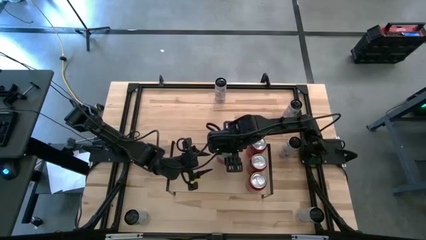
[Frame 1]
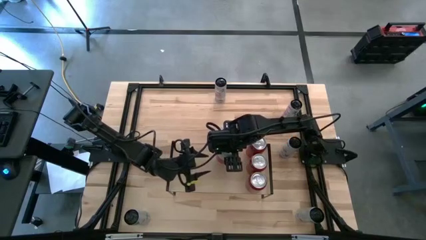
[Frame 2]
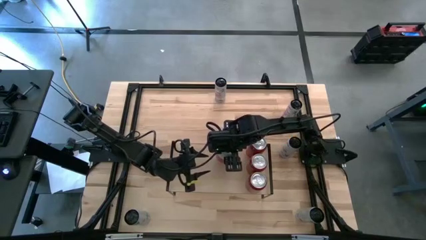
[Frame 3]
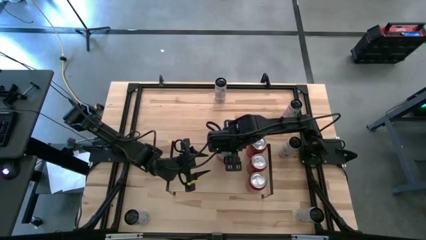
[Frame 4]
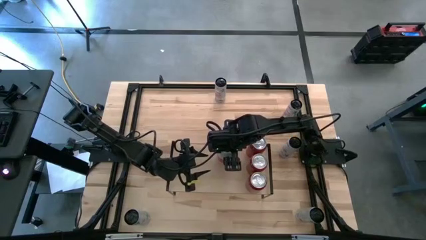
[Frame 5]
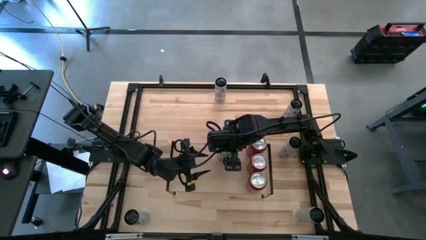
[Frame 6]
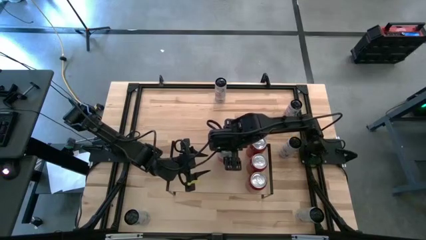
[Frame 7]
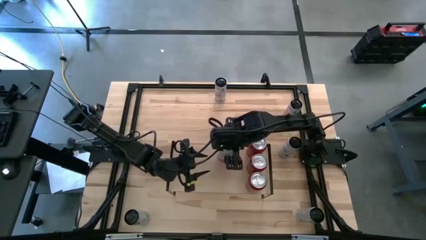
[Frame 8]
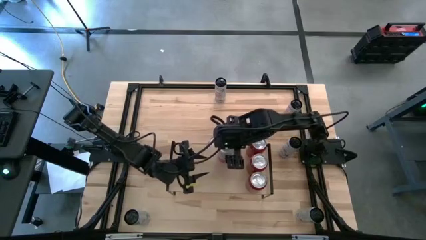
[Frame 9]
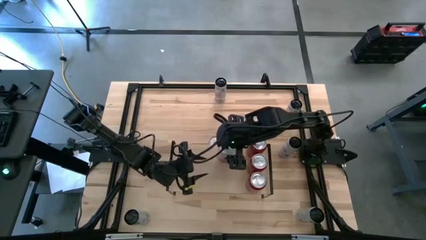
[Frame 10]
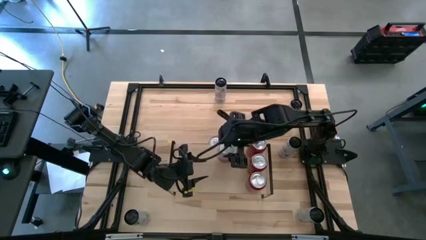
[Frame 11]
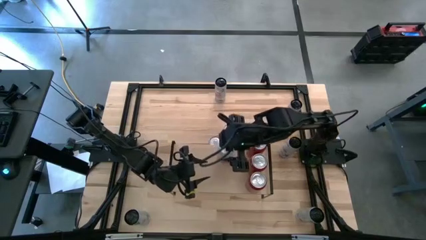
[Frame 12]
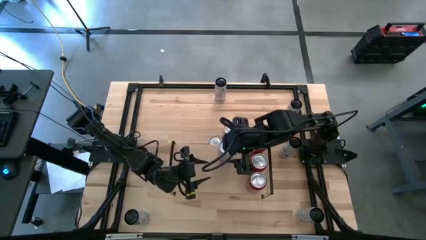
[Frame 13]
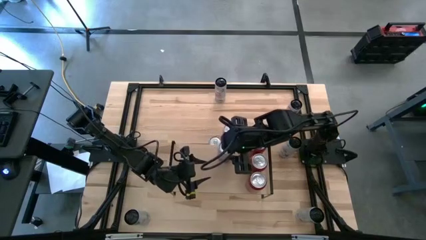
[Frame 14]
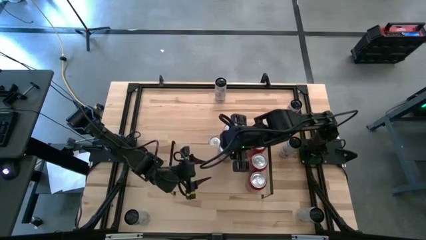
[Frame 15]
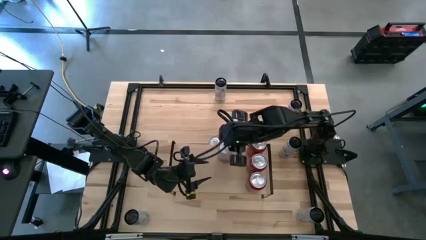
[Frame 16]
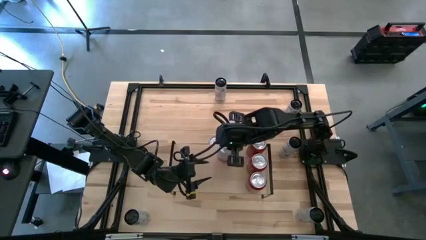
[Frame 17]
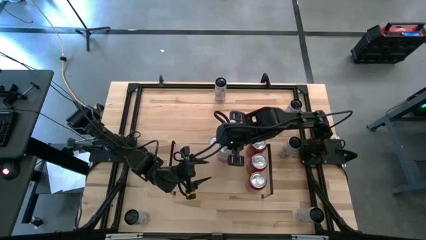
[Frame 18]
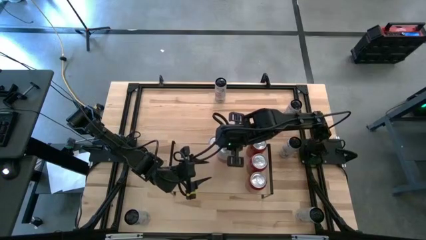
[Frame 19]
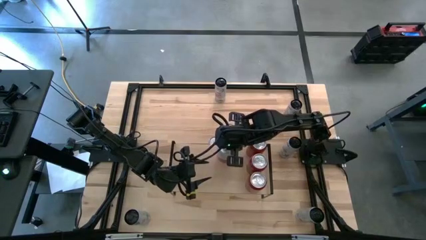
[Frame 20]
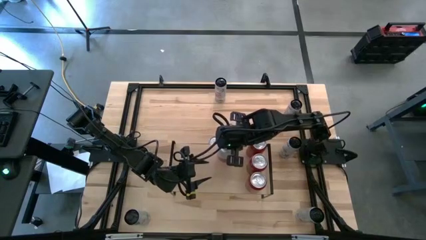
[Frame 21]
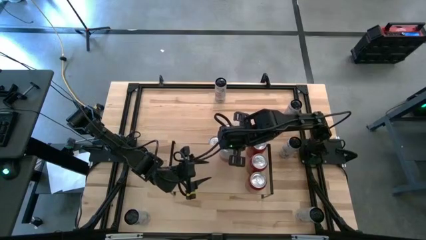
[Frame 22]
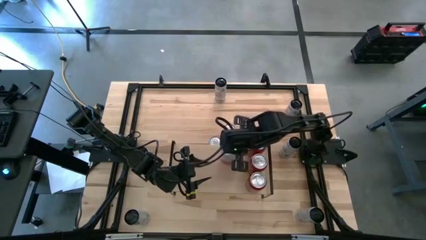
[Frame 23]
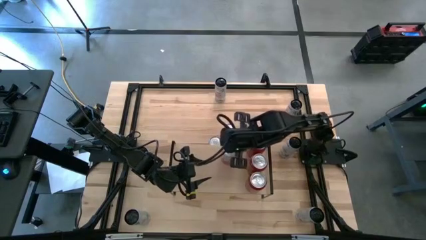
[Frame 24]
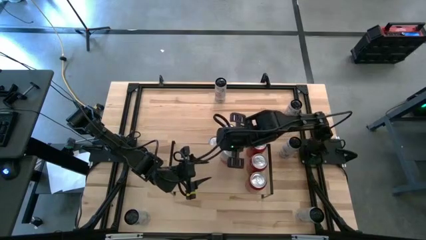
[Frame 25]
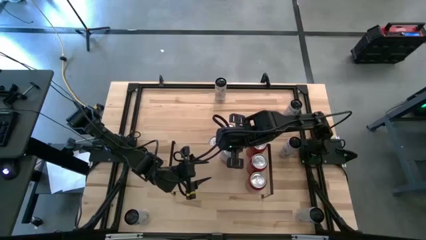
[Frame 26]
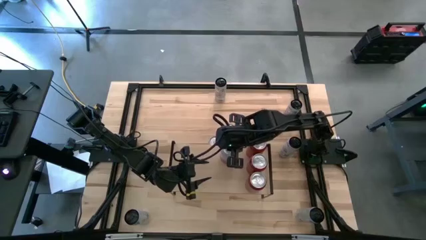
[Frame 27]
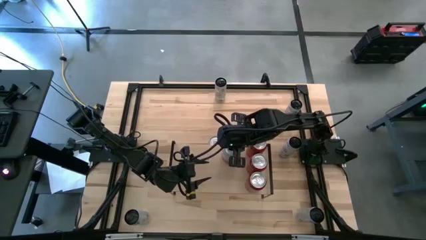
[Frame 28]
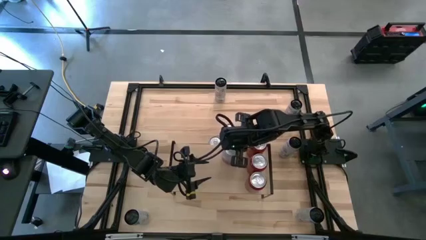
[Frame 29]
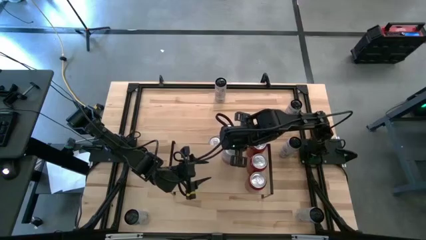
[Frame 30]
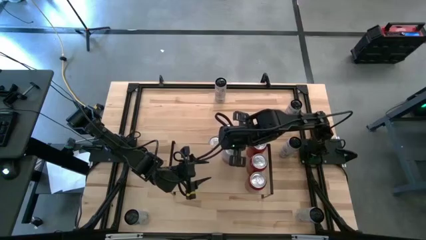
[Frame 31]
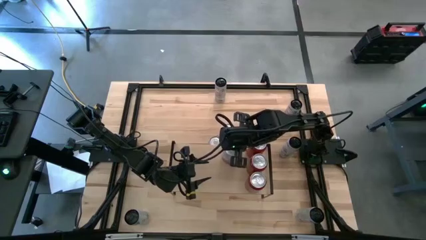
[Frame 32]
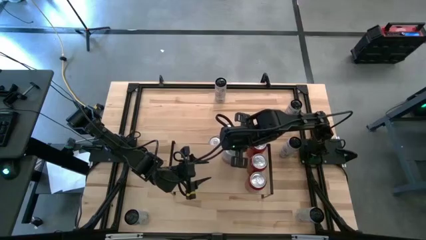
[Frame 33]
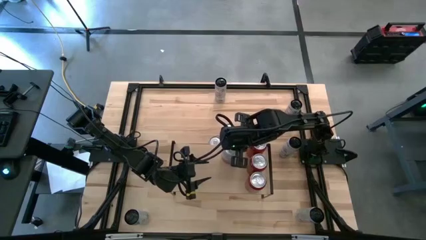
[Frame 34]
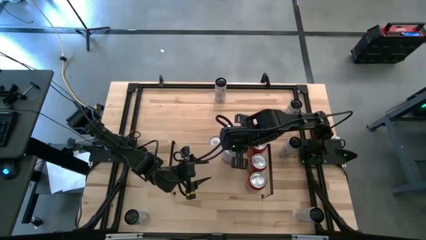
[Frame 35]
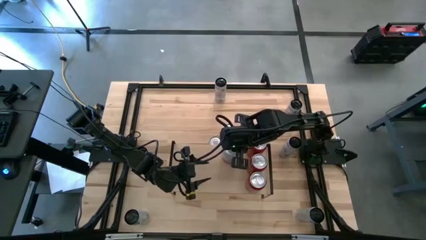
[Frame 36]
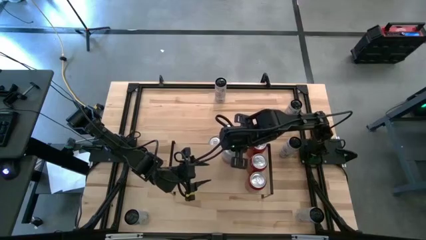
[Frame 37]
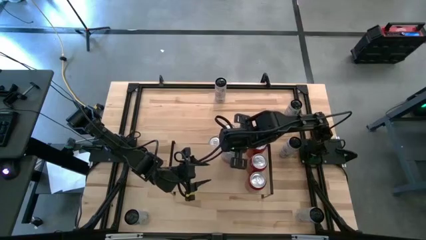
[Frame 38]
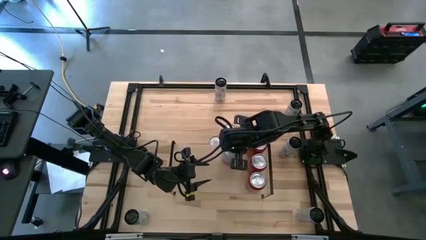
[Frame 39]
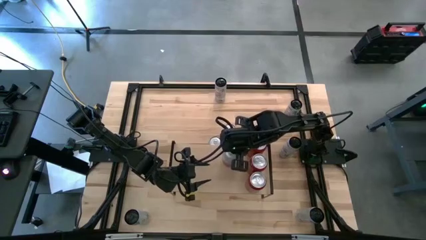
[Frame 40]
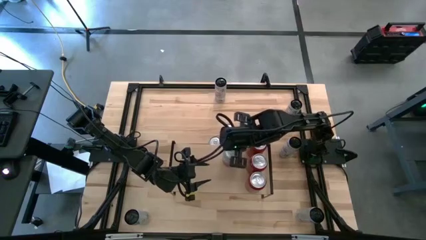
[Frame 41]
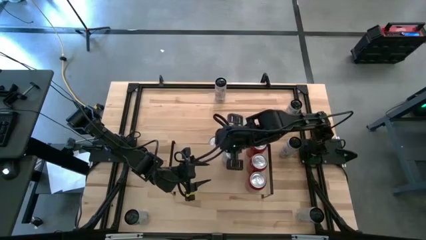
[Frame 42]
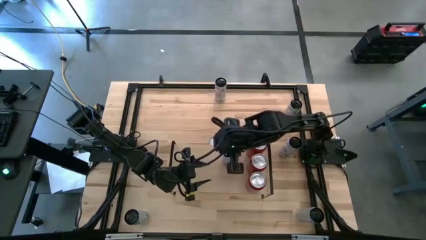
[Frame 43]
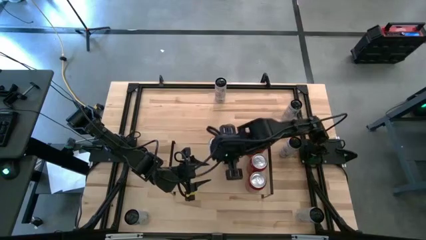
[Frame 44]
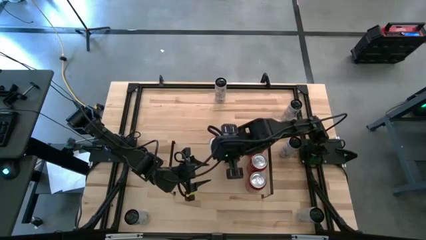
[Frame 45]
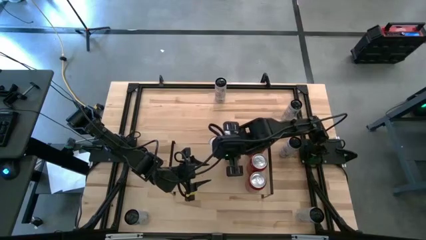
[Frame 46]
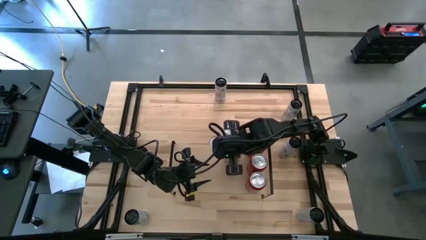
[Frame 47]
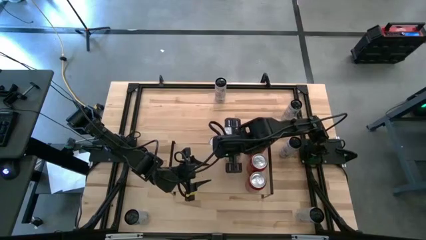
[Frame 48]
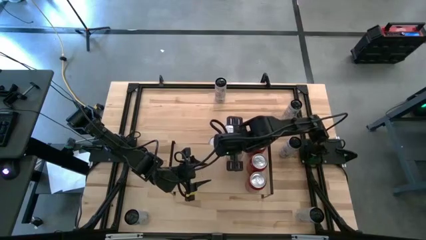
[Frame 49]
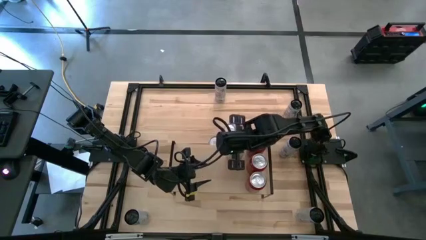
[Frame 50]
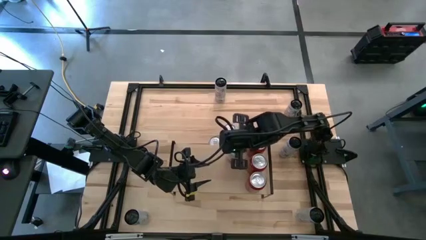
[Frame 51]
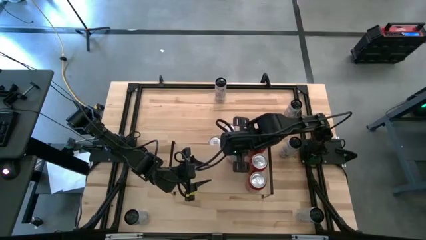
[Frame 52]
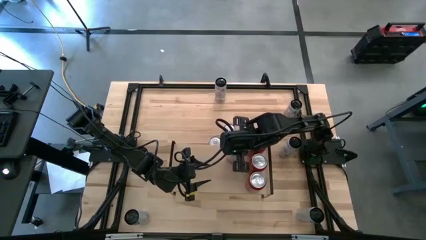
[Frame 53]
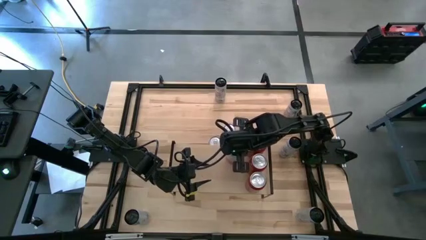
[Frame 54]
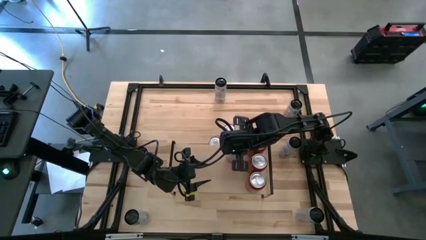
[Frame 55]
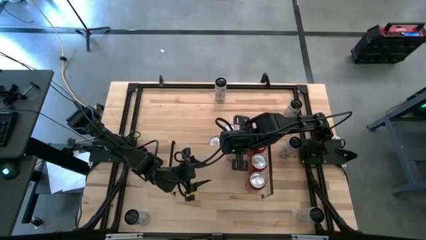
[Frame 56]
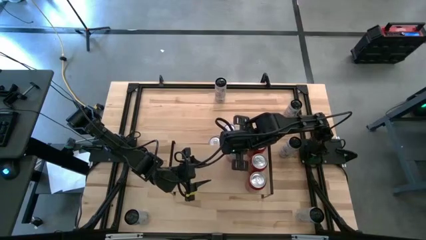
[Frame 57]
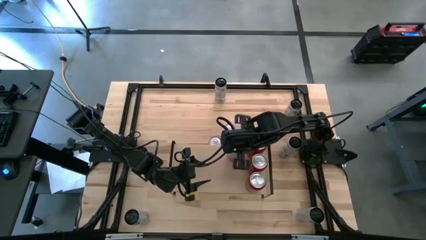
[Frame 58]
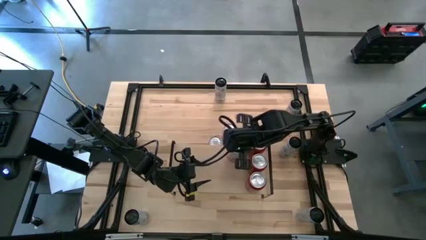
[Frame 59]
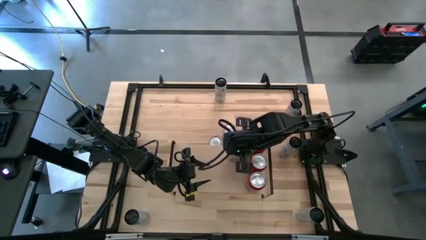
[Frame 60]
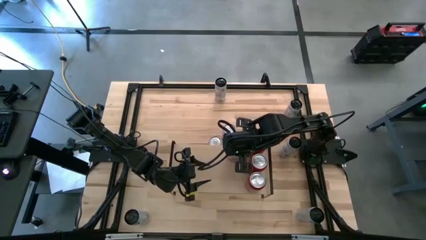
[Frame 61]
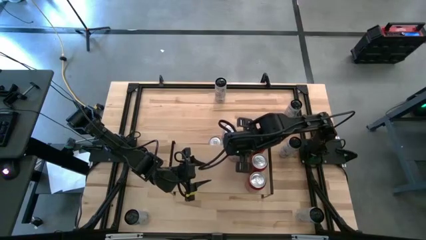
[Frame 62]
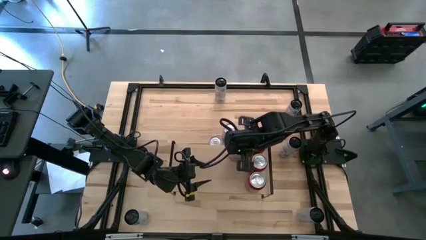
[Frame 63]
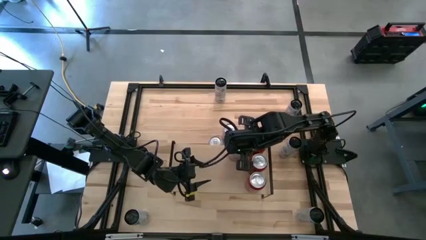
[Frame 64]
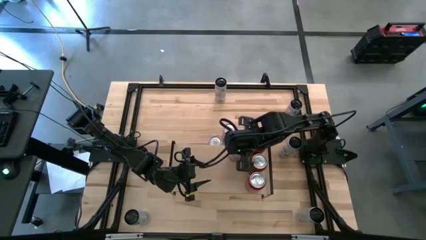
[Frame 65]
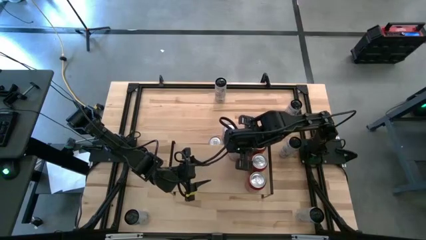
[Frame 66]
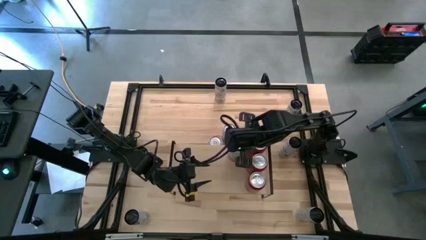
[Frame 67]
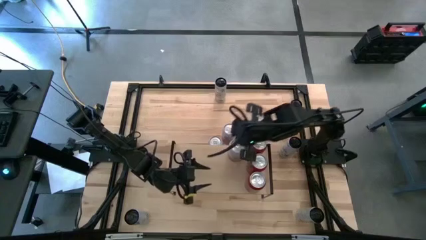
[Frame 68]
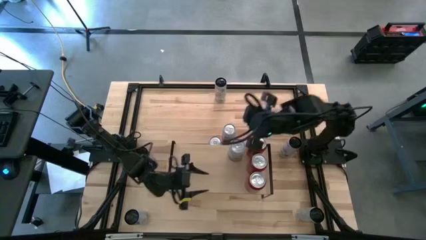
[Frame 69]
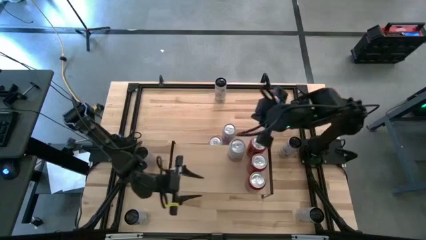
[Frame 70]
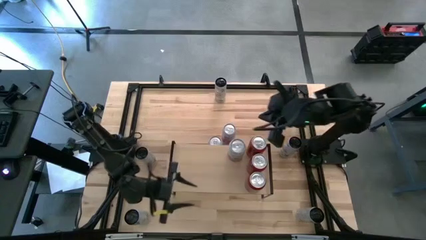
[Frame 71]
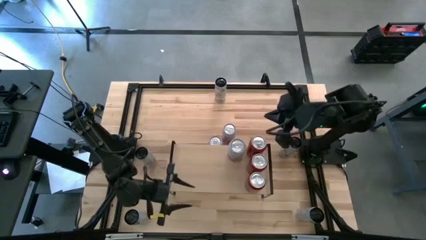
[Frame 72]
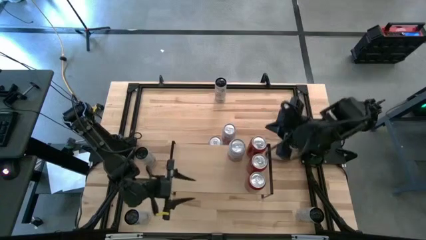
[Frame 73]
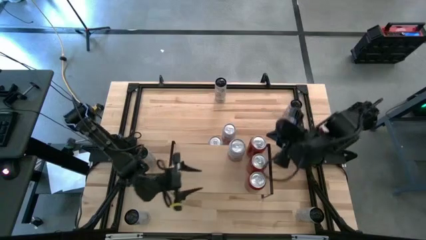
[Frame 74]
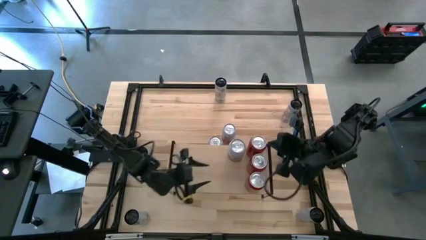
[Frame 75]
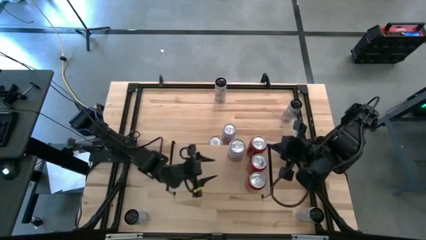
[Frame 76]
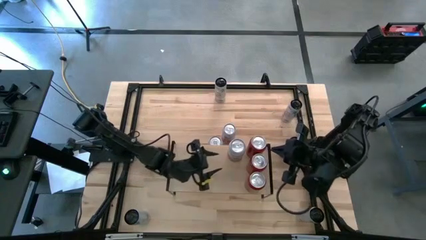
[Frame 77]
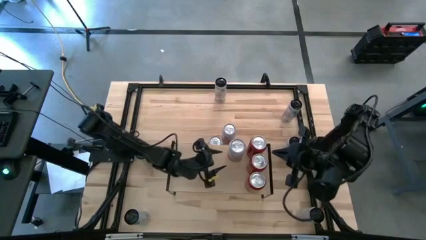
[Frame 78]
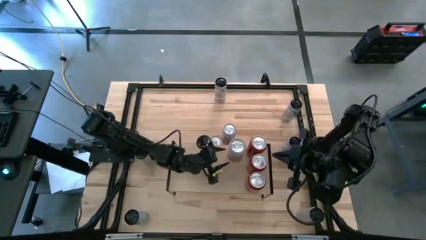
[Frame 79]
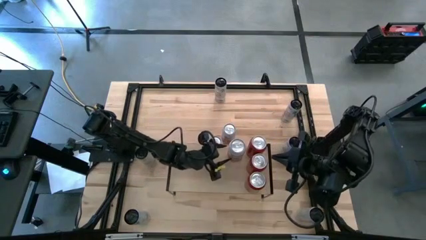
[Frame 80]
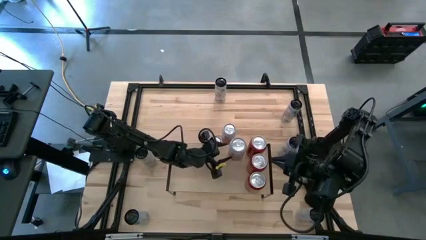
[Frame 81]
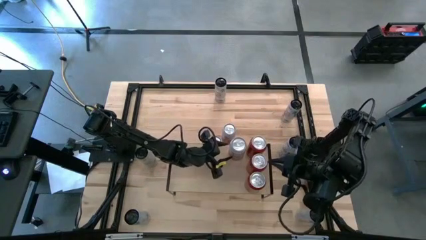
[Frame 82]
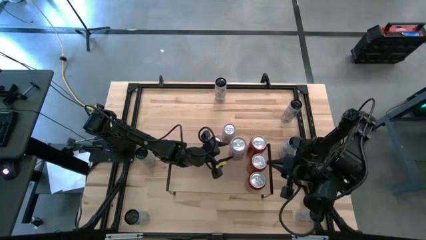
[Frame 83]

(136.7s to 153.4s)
Task: Place canned beverage on shelf
Put the top pink and white bottle on the shelf
